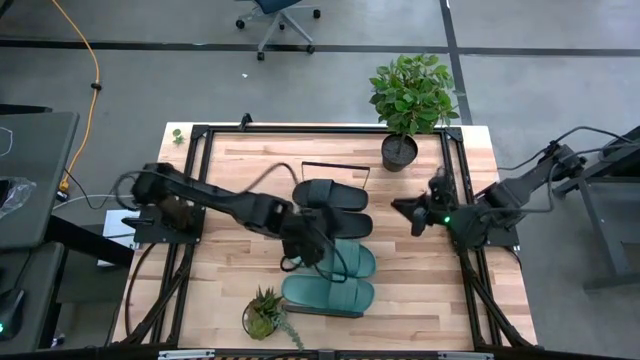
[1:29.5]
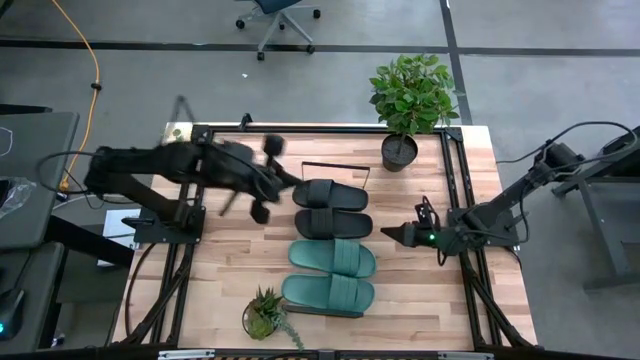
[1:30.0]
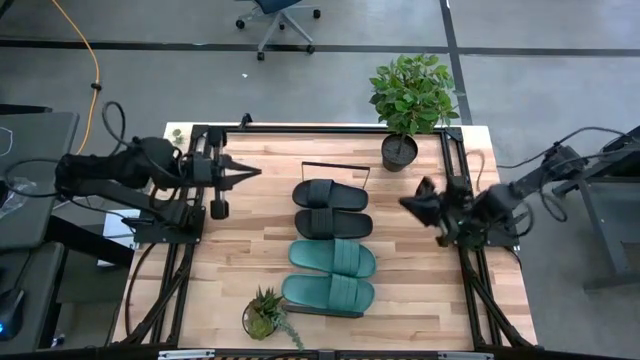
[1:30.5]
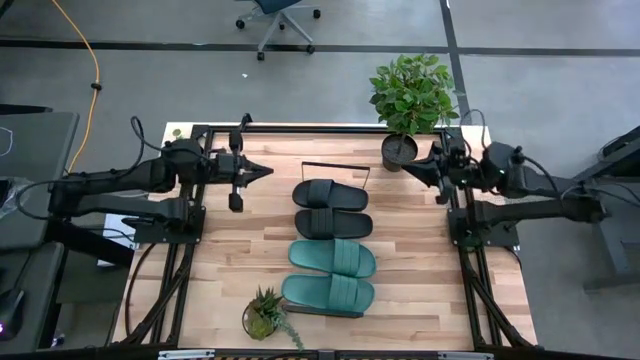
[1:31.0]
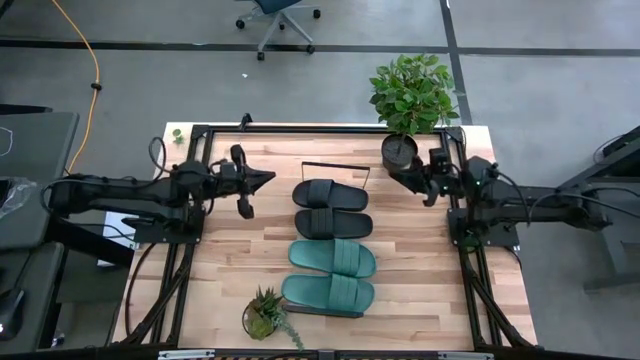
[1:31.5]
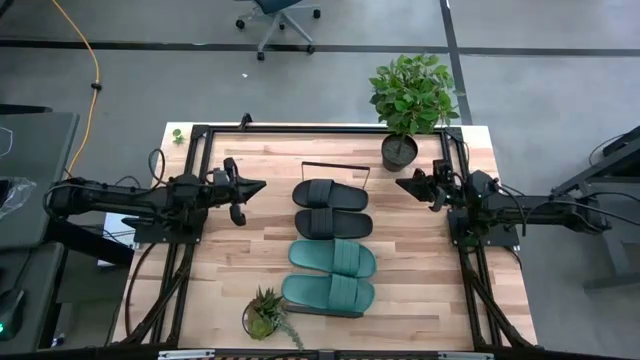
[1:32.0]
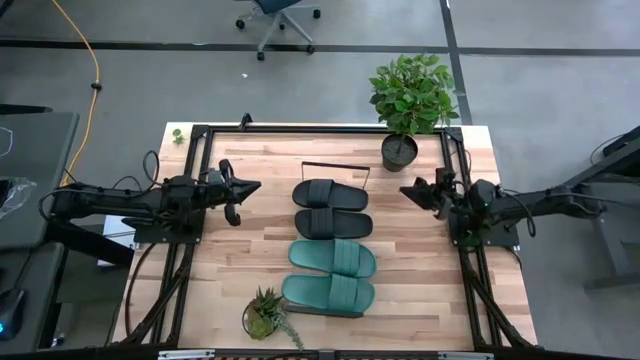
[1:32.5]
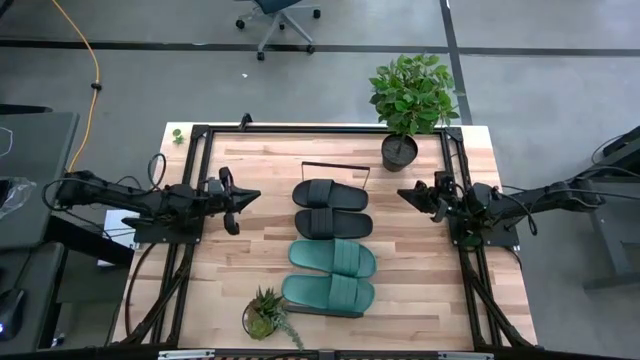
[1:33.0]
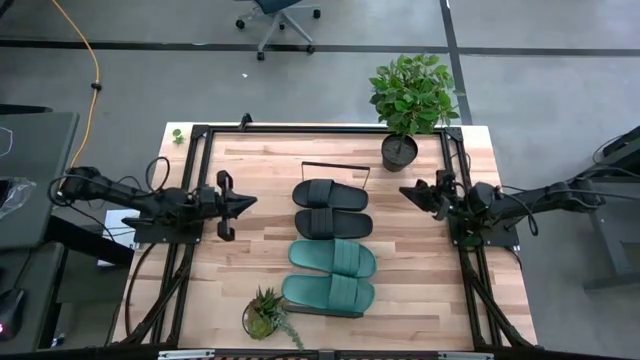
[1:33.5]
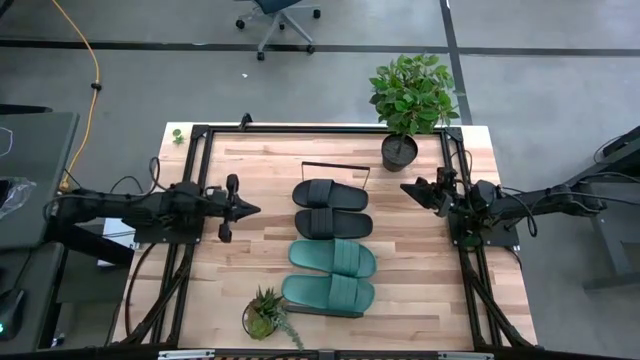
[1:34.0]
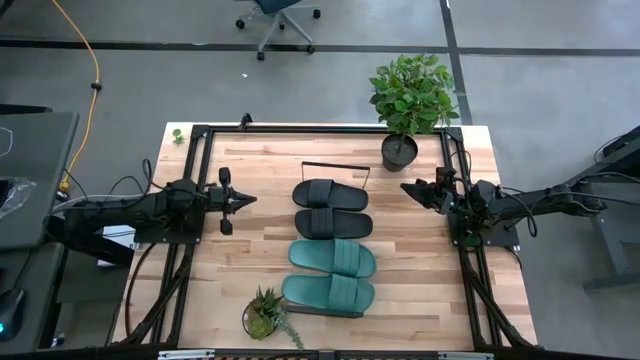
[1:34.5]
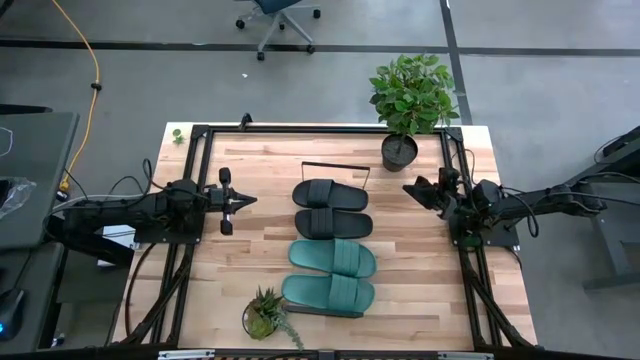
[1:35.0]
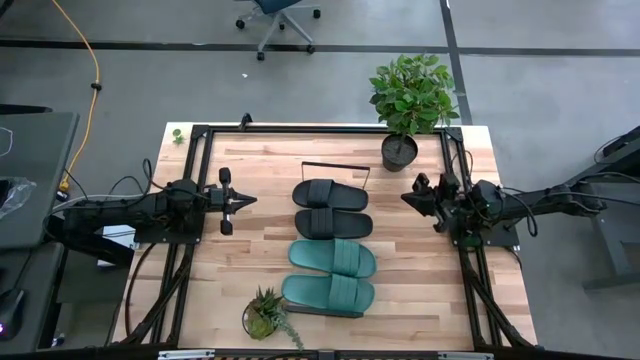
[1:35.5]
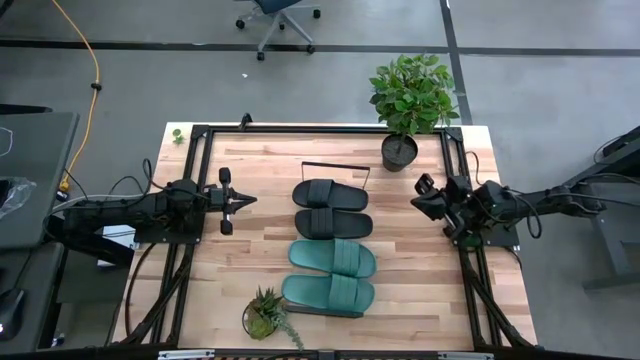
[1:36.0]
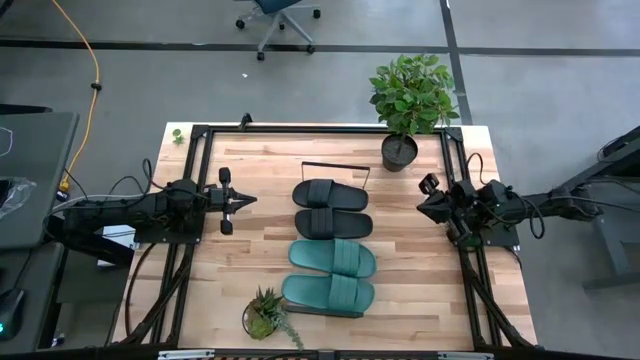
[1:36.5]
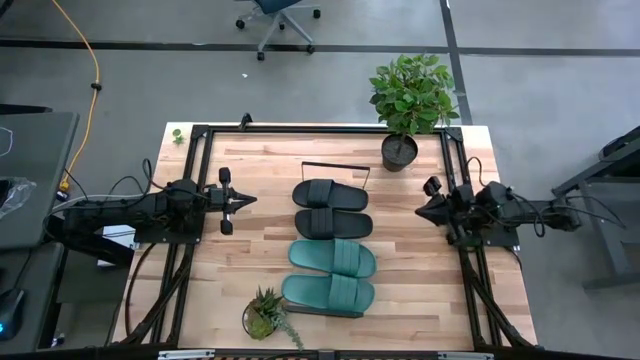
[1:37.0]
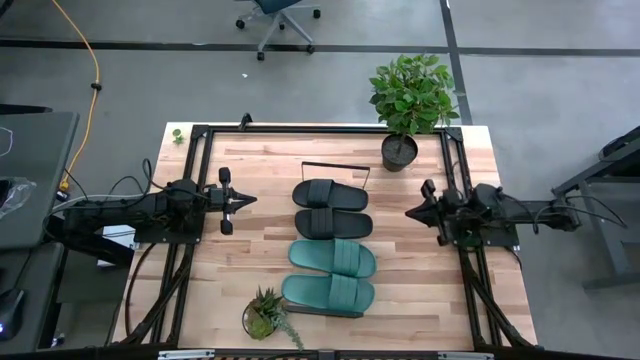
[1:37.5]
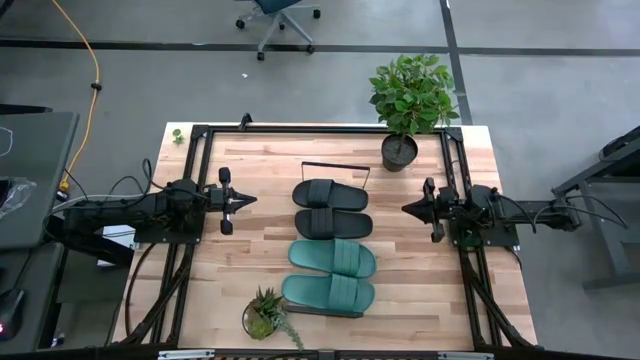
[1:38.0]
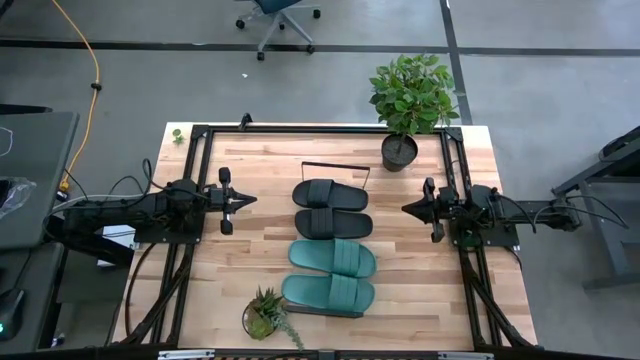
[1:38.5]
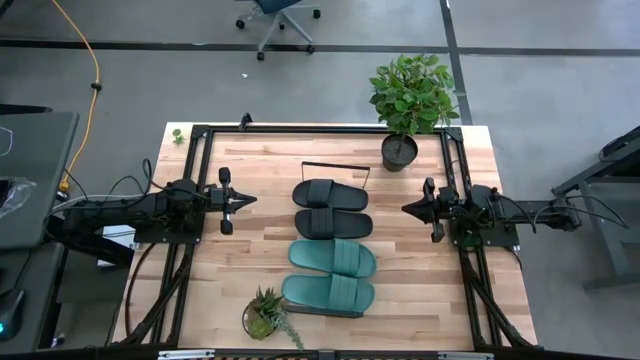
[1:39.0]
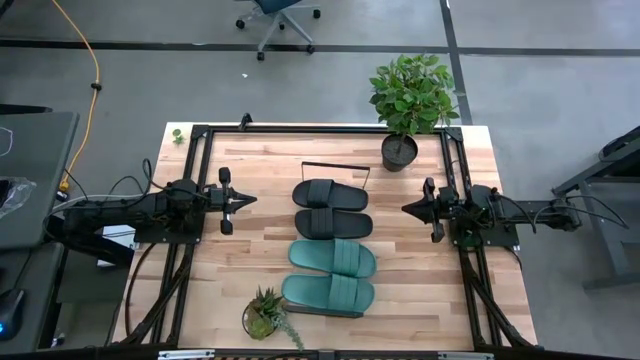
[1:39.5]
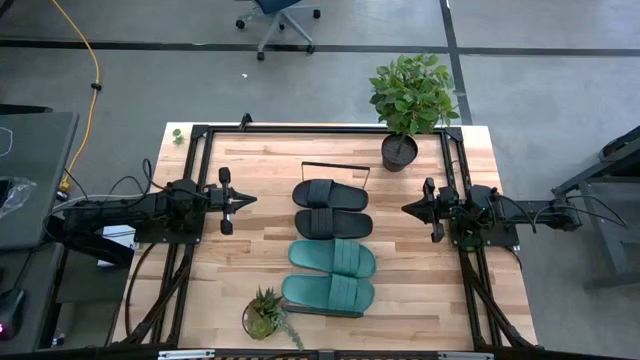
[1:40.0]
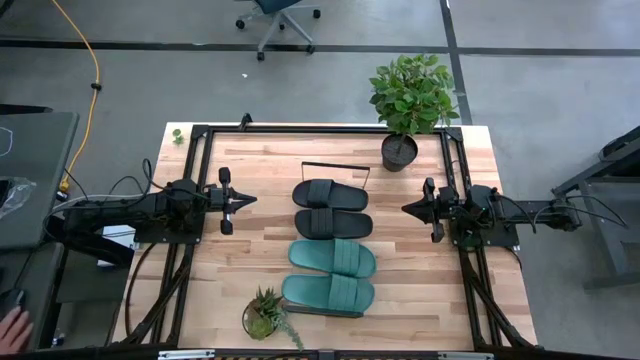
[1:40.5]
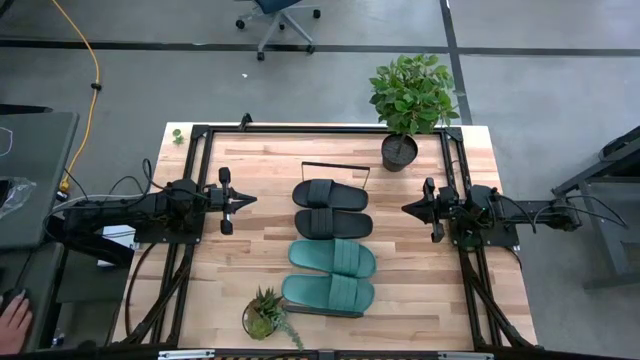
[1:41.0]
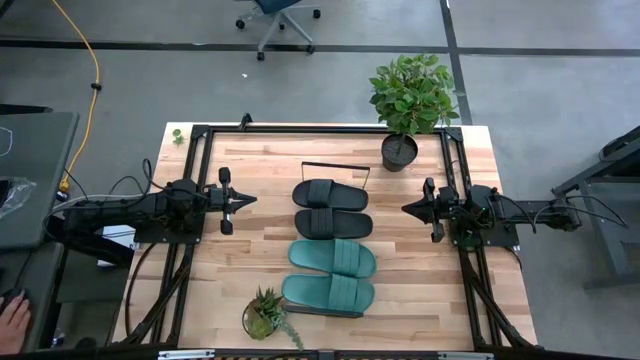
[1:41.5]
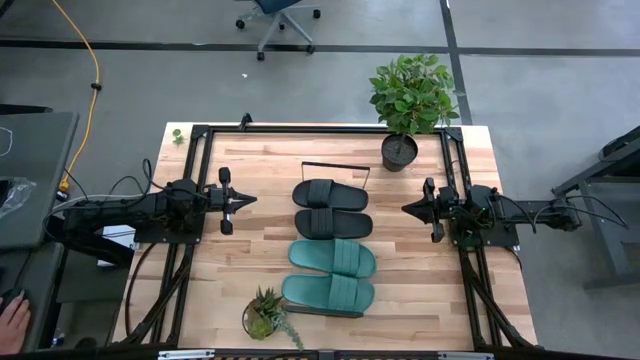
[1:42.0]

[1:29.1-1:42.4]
Task: Pick and place slides into the shelf
Return to Home Position

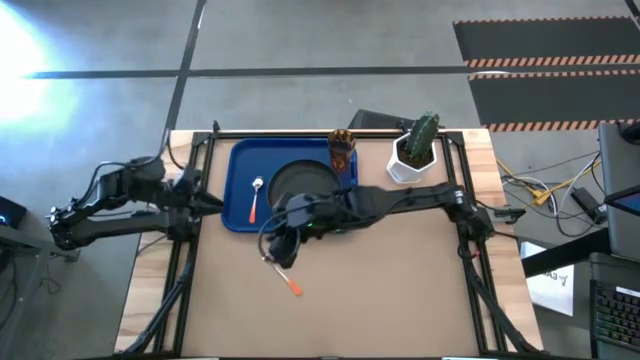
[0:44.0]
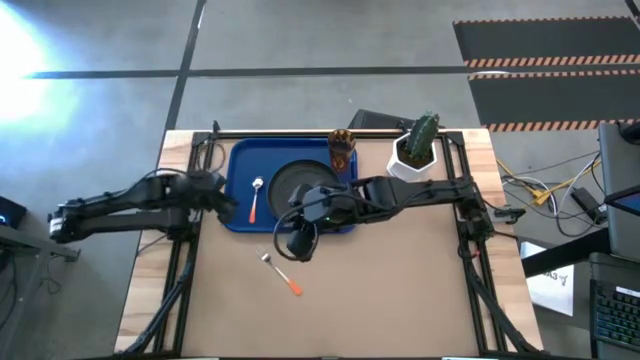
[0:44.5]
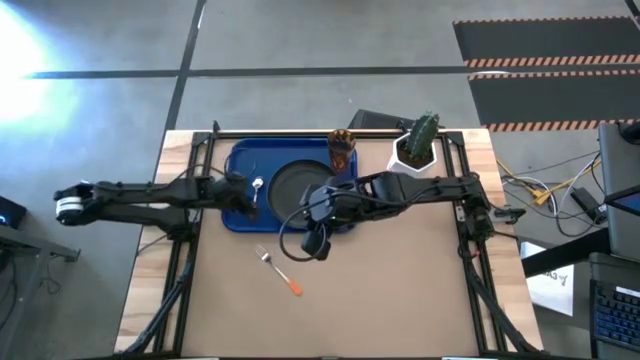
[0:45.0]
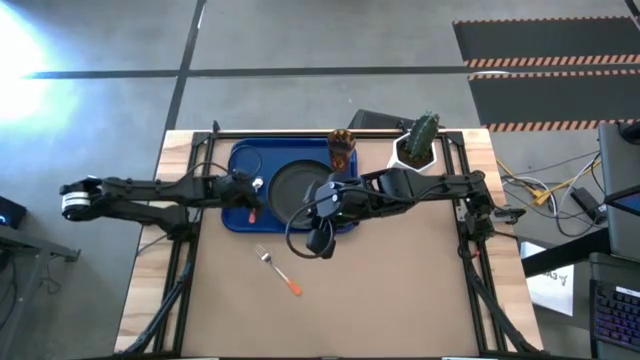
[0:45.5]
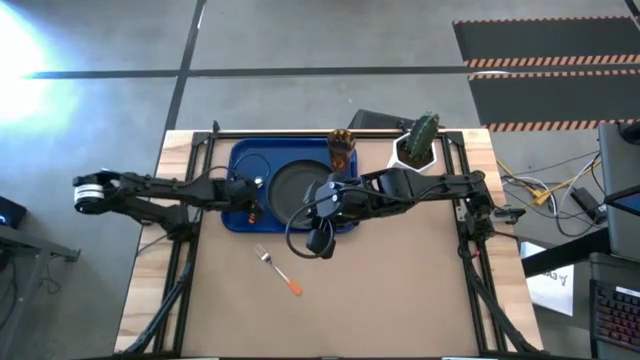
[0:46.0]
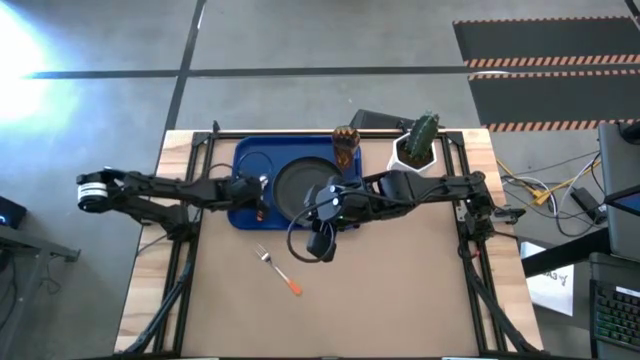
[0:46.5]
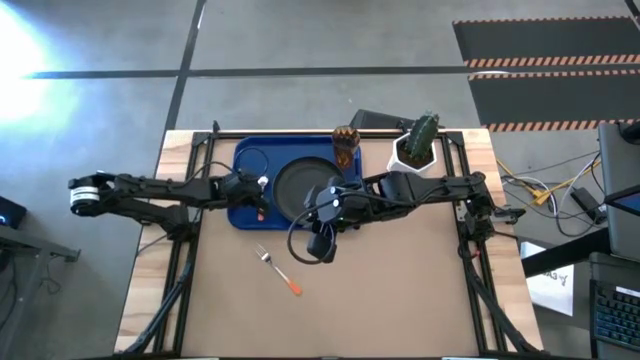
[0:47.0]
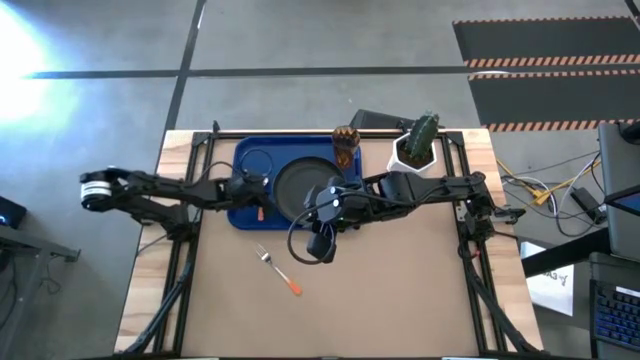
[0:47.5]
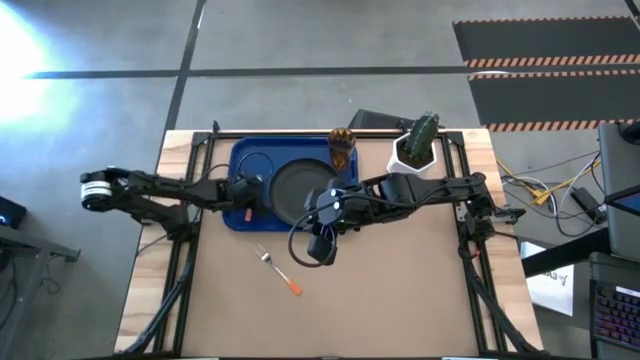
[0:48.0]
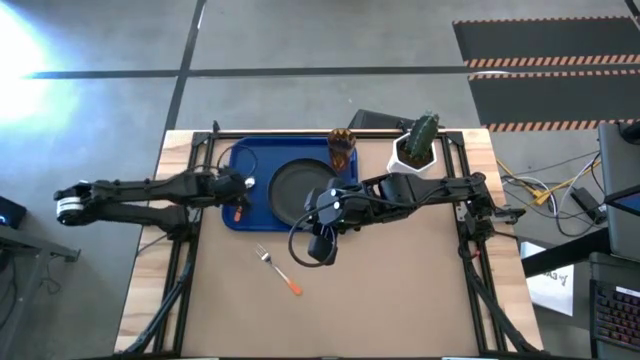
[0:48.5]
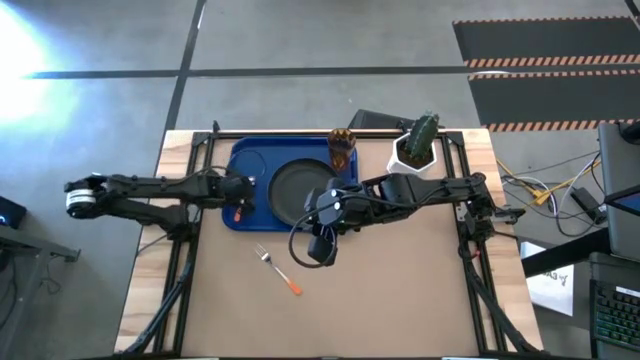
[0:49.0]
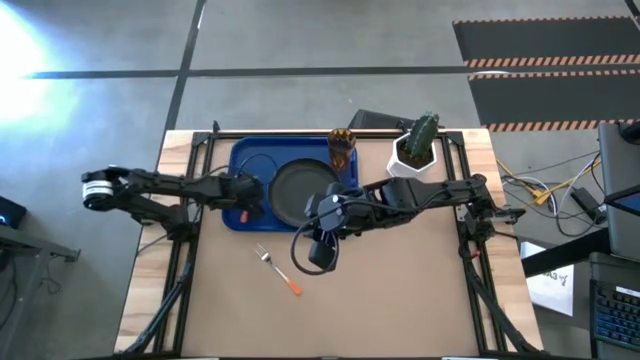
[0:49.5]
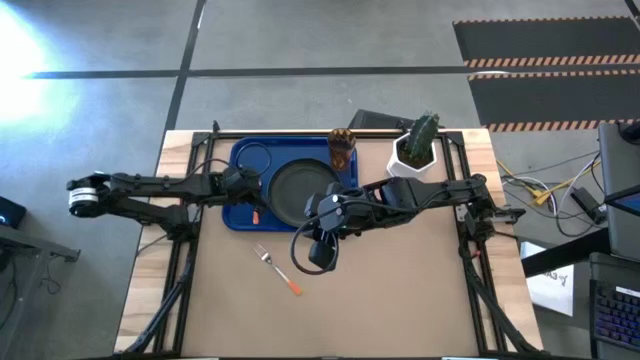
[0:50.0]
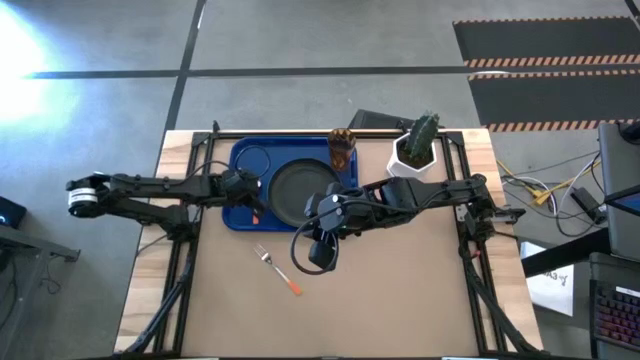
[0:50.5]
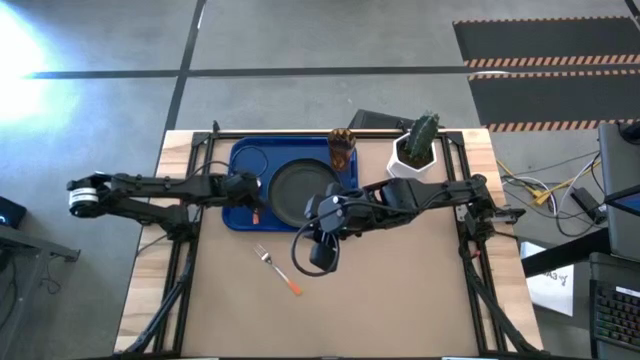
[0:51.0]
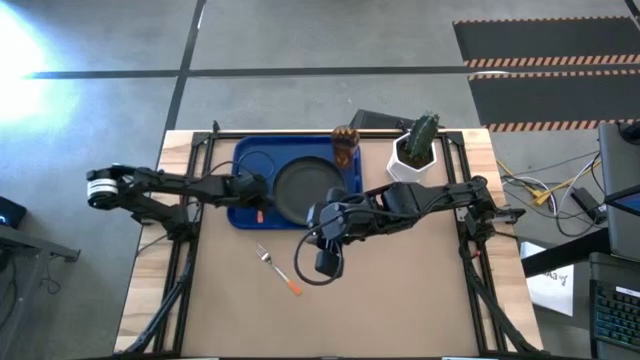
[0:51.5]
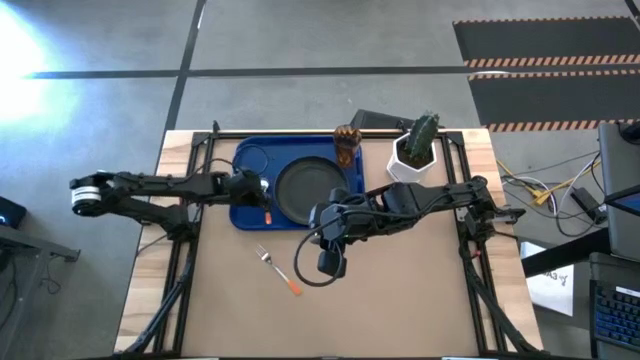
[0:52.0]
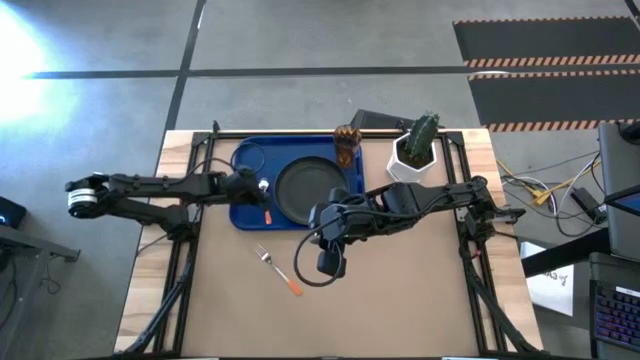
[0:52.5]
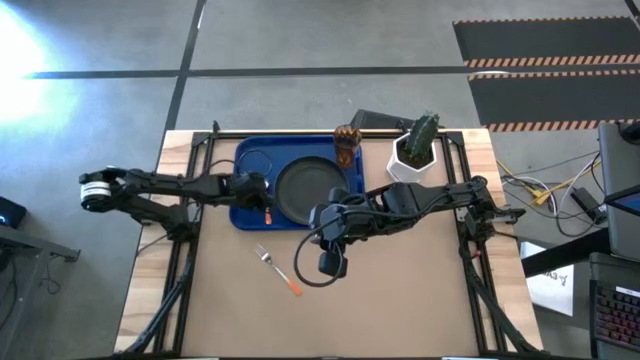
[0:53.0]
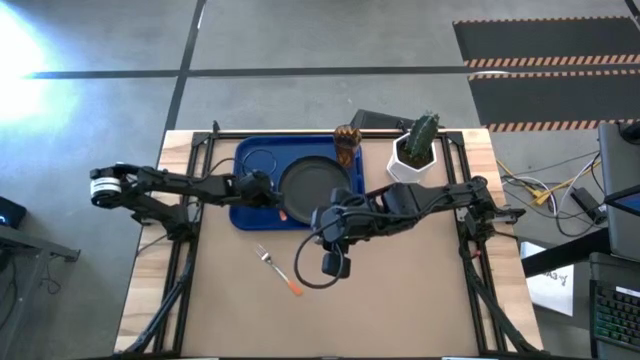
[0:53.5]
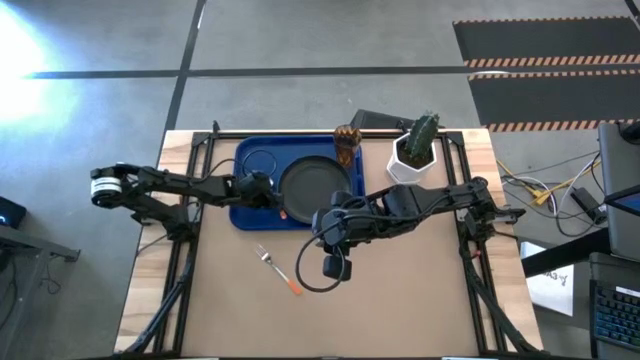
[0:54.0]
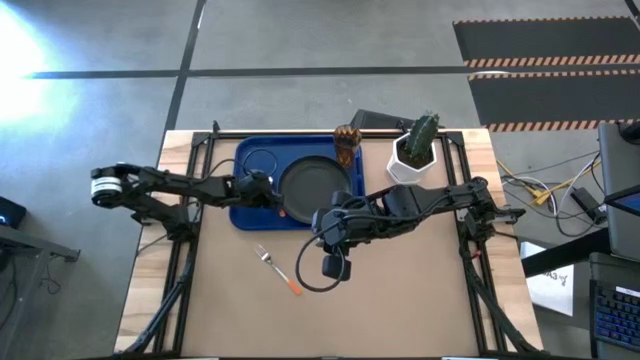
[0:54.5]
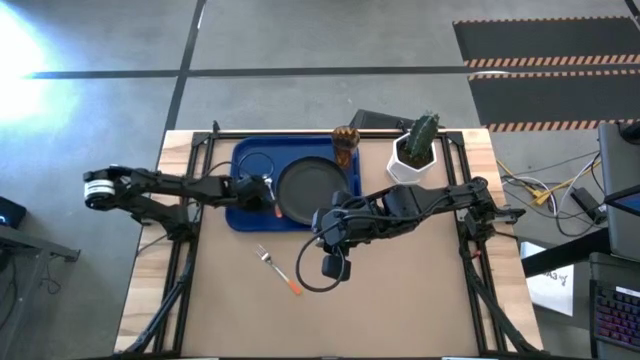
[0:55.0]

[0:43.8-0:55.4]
Task: Pick and place plate/cup/fork/spoon on tray
Adjust the orange spoon on the blue tray
